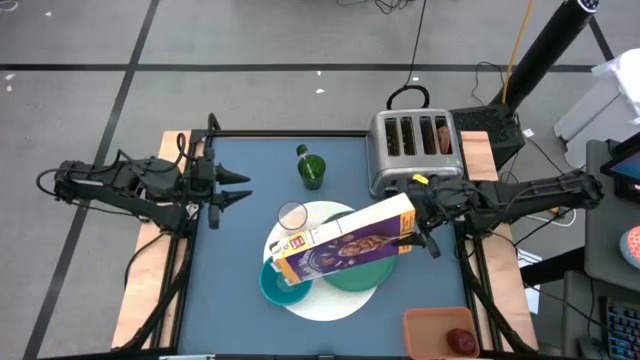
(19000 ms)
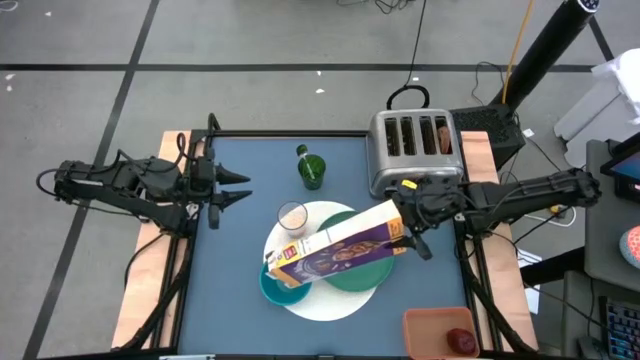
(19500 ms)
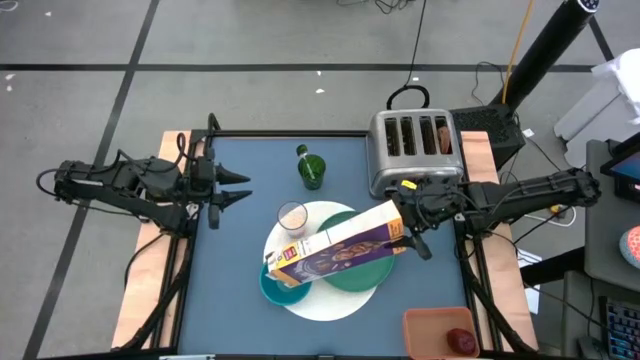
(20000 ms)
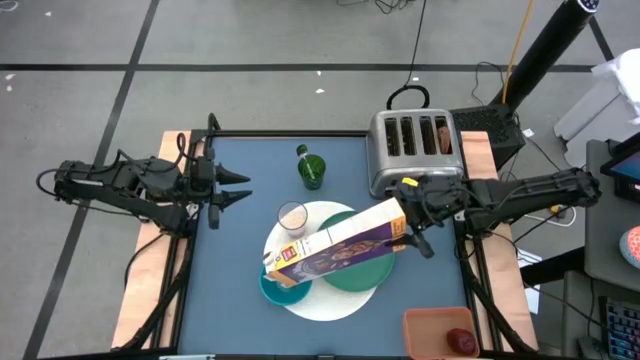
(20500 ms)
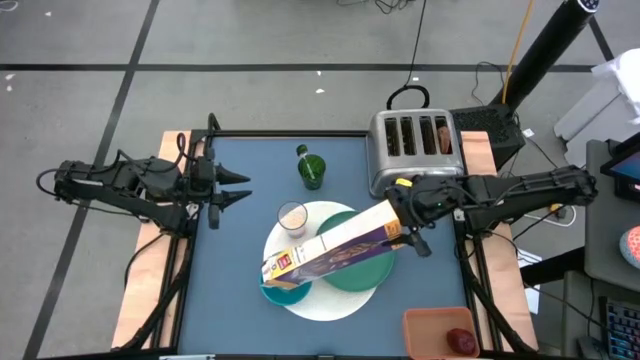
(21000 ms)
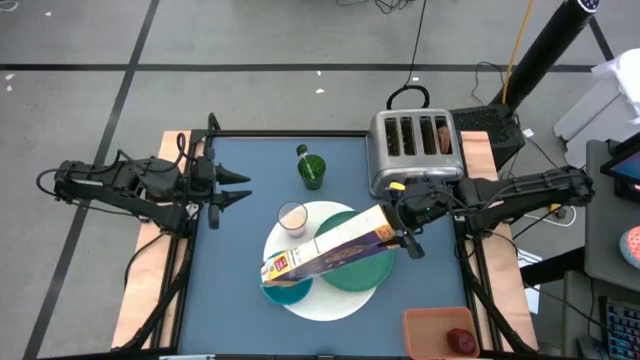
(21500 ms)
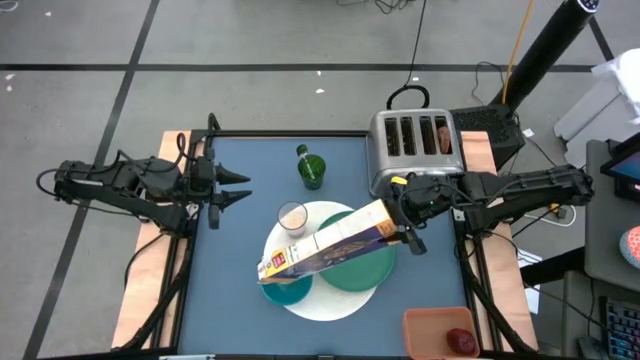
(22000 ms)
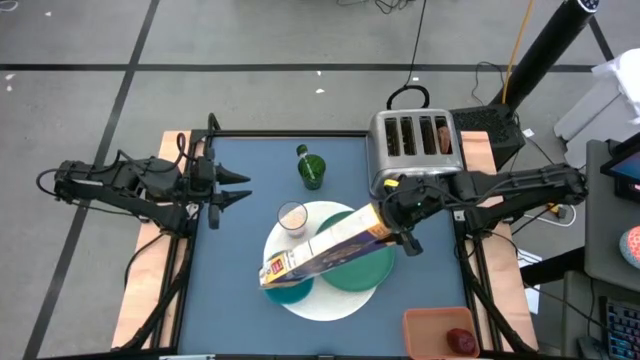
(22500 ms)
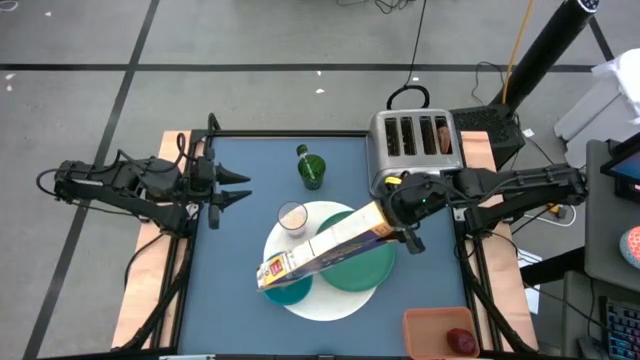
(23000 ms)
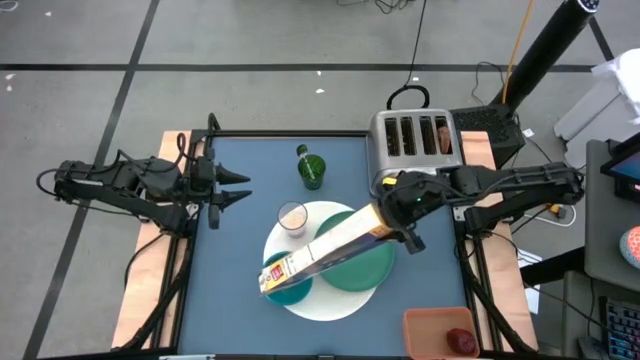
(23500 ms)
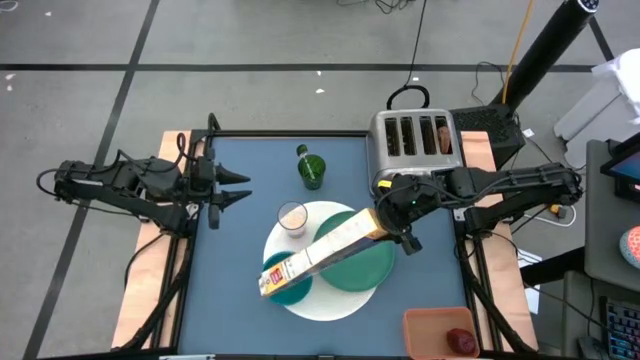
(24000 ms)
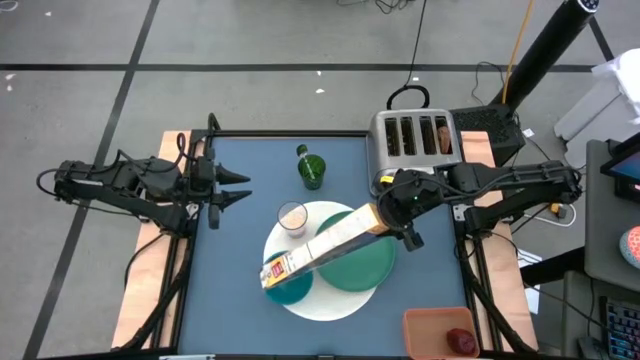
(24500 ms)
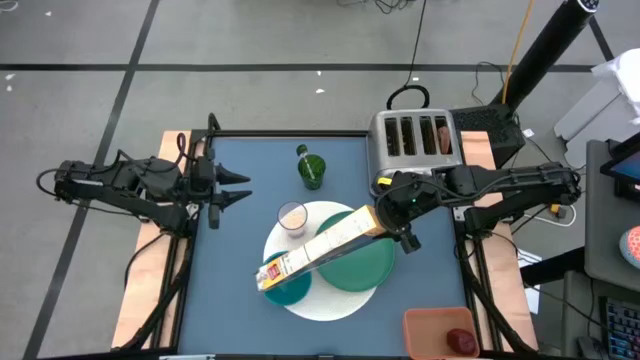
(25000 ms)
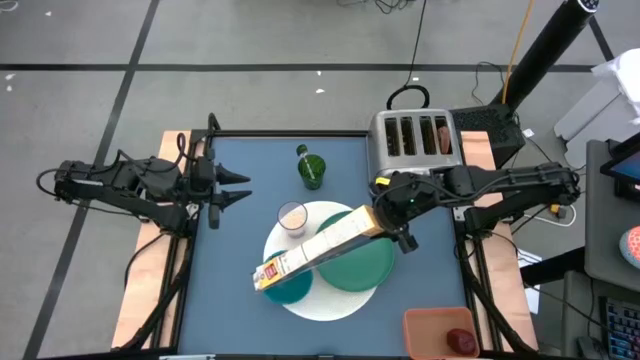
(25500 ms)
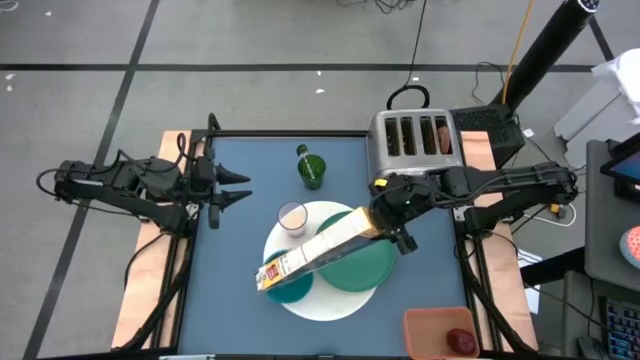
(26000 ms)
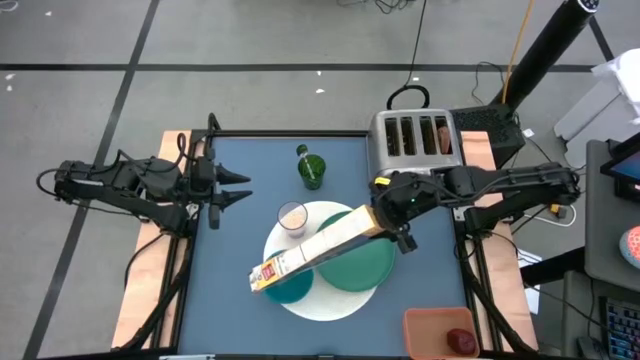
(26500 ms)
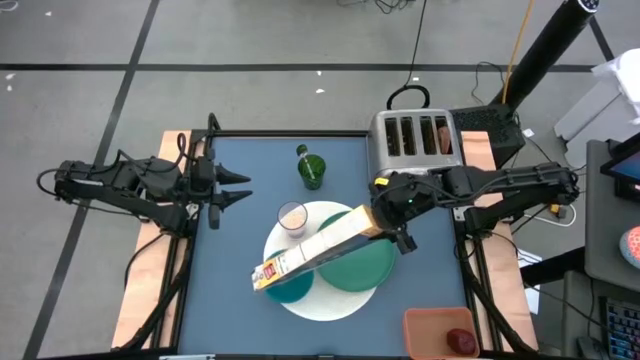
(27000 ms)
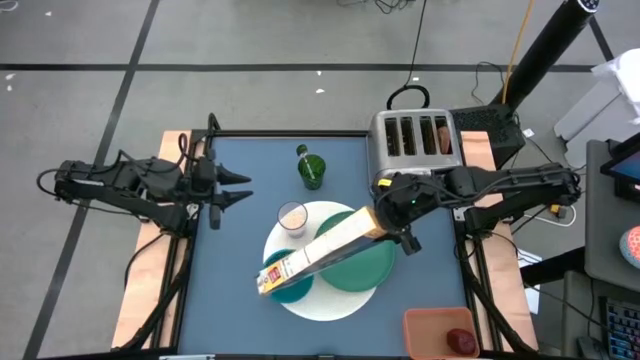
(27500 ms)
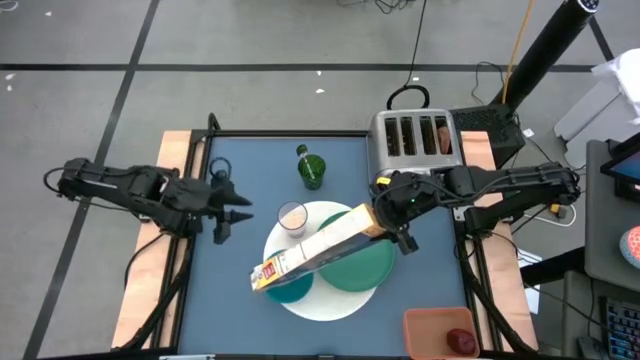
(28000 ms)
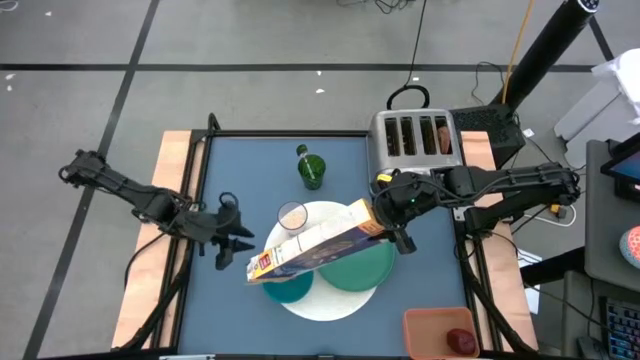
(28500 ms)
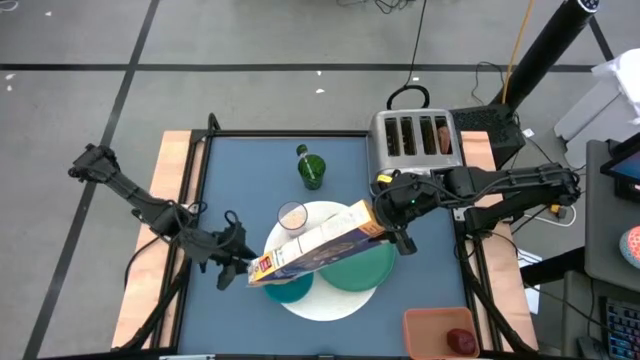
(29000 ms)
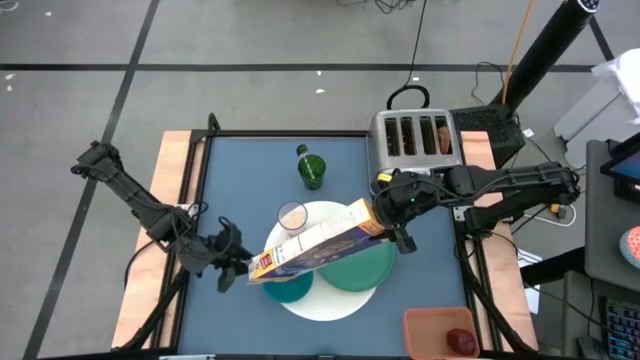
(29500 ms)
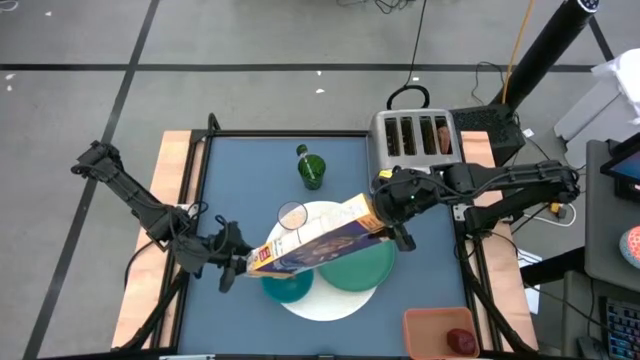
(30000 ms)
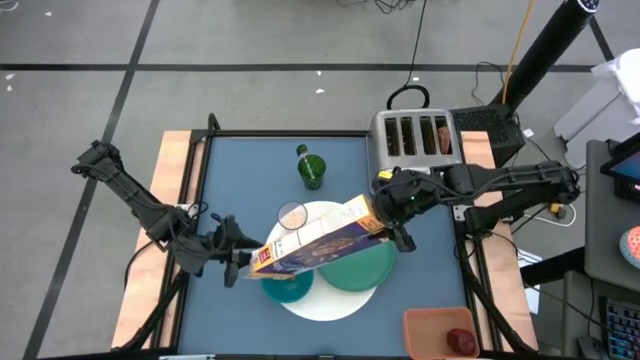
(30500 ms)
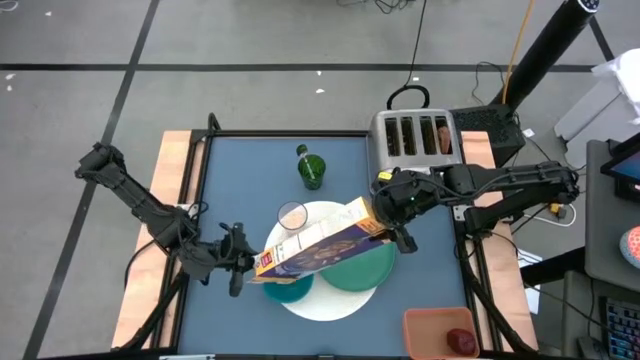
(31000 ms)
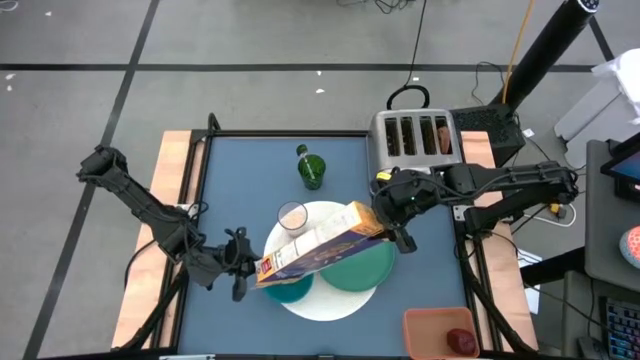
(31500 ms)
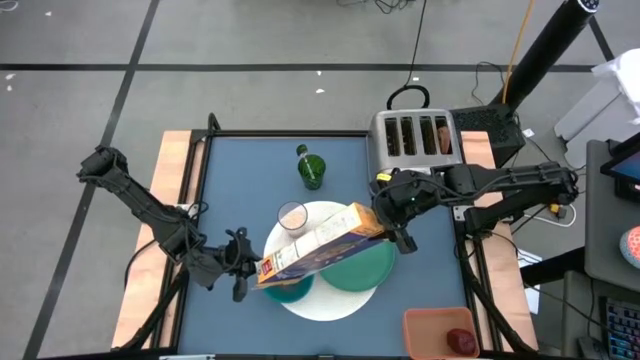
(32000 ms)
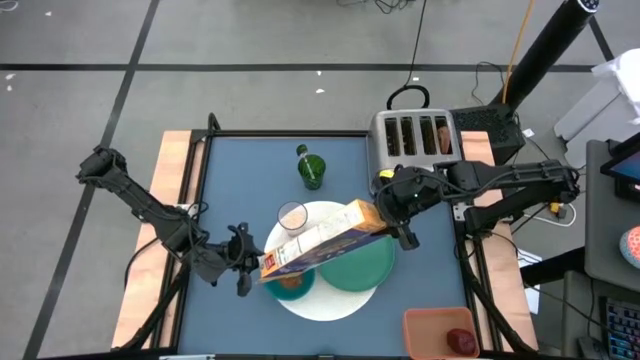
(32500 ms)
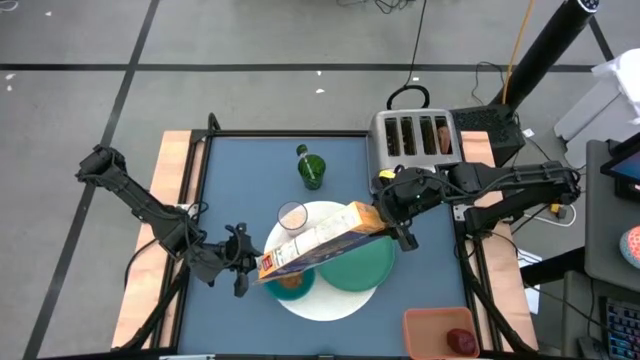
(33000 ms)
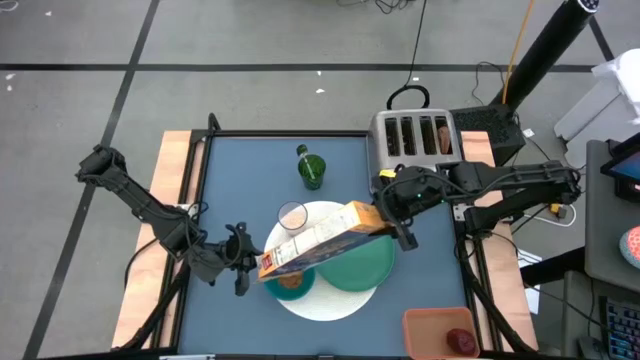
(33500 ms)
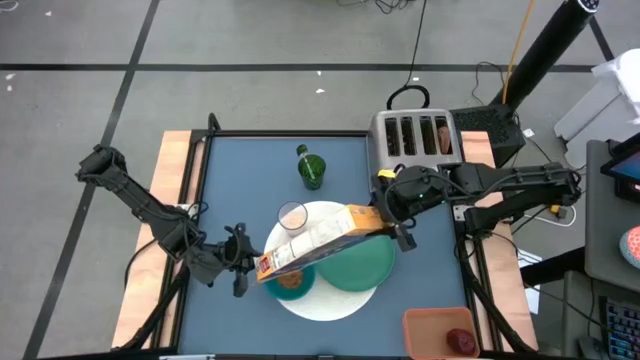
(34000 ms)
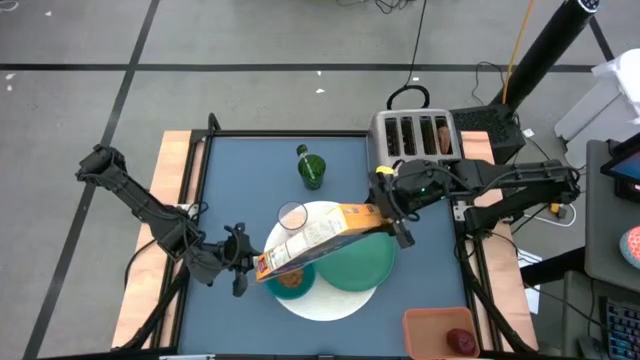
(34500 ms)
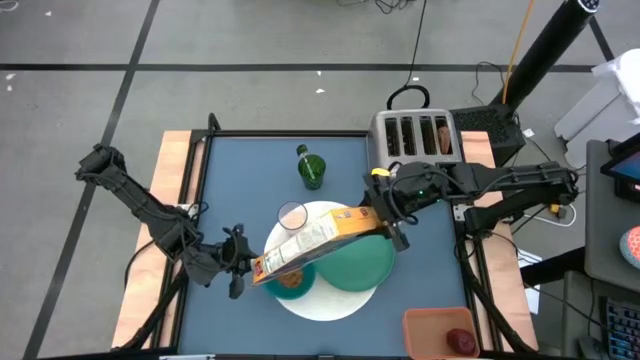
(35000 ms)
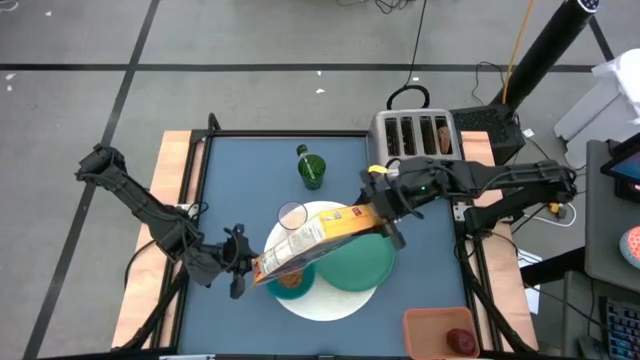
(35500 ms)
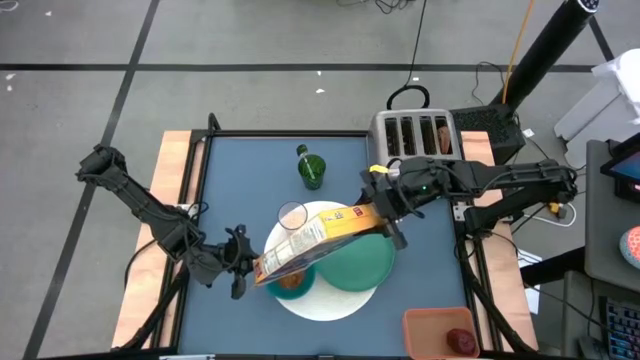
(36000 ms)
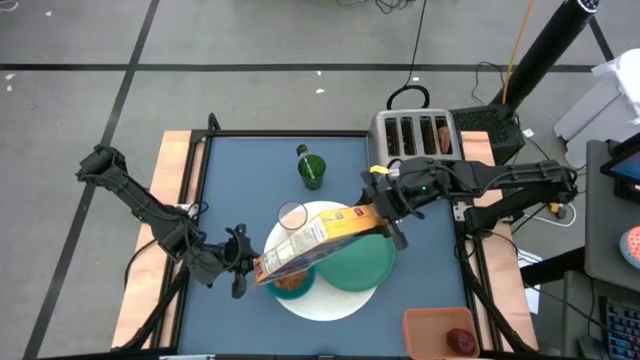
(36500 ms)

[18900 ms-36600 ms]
Task: Arrange a breakfast setting
Pour the cereal into the blue bowl from the cereal box

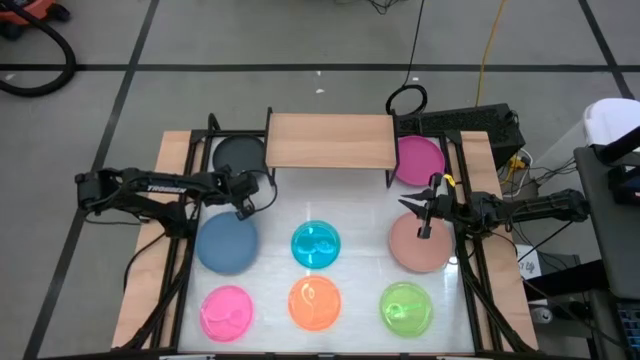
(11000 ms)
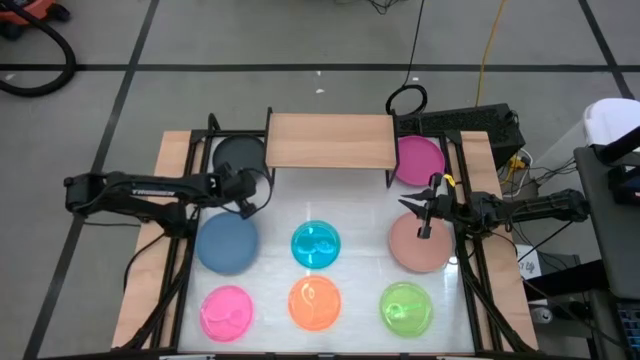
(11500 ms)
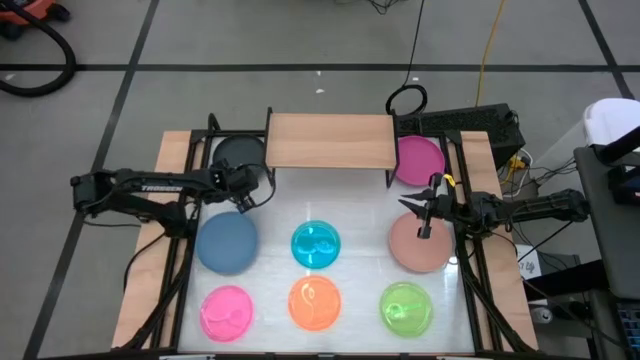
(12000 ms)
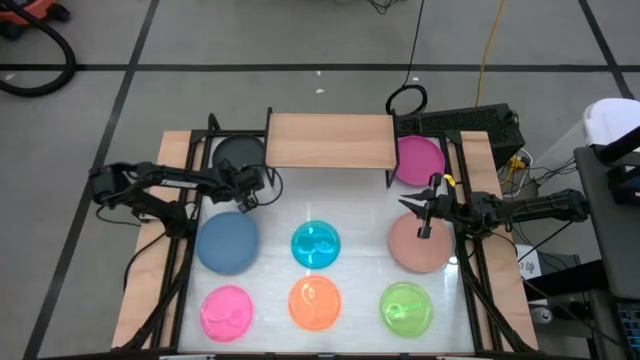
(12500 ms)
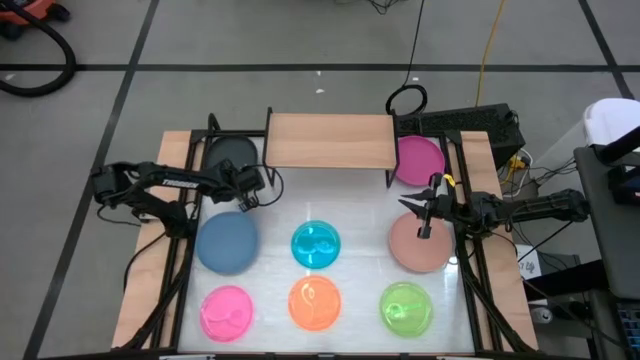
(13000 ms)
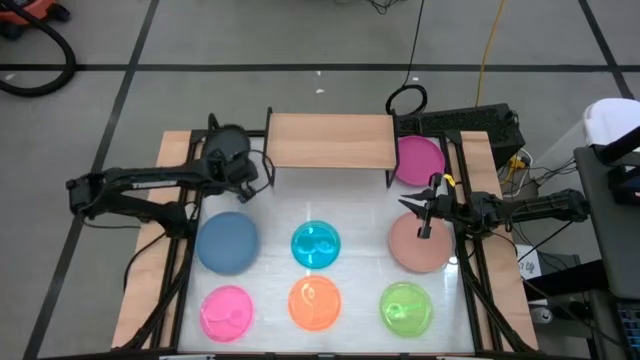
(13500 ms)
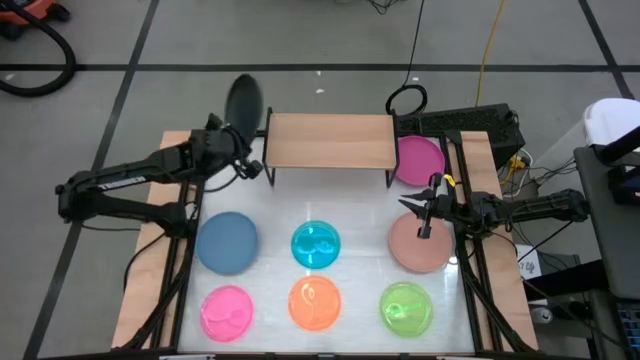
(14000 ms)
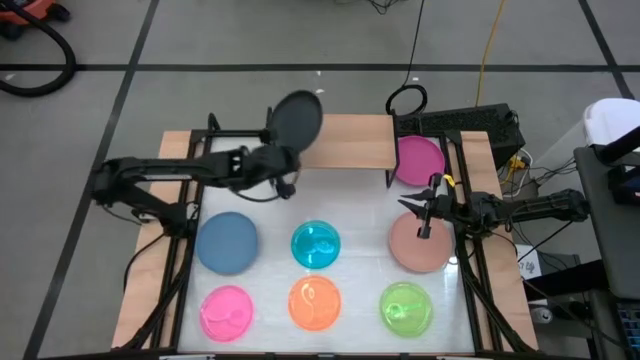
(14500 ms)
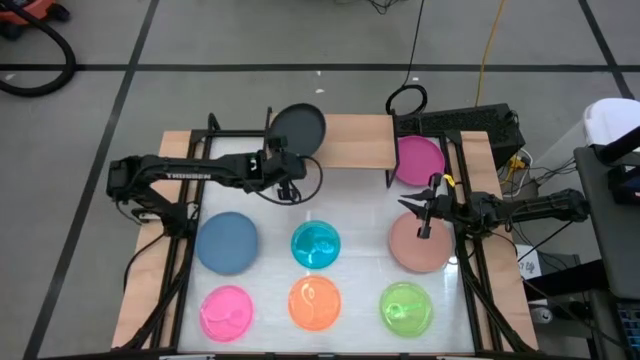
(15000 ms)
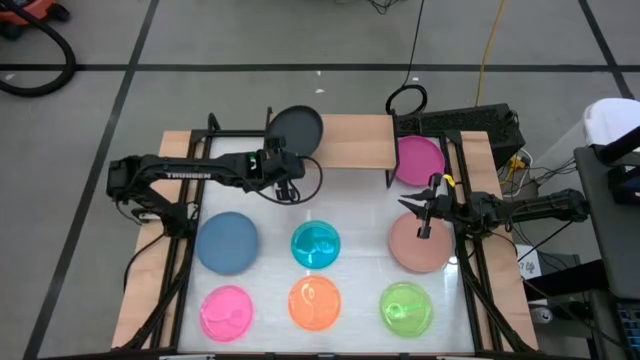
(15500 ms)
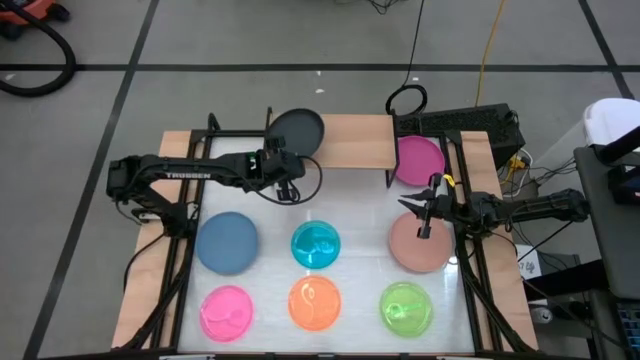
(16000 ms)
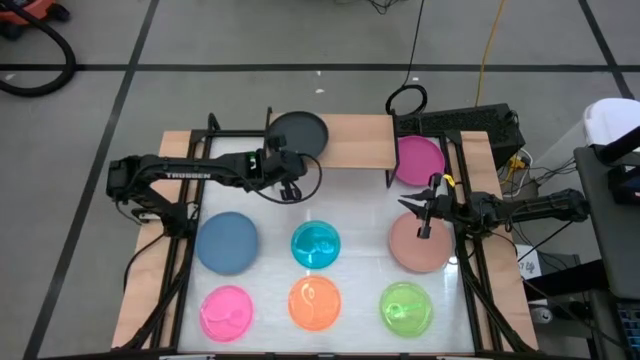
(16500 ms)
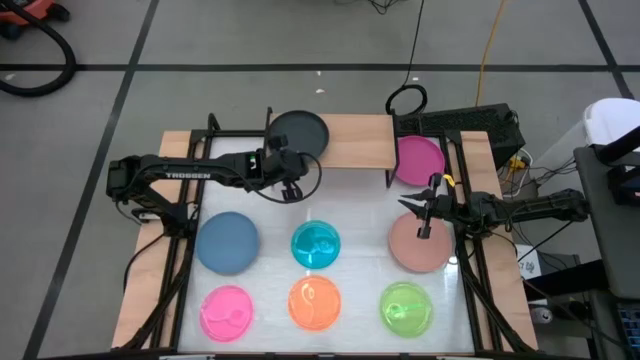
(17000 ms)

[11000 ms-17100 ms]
Task: Place and stack plates onto a shelf
Put the black plate on the shelf
